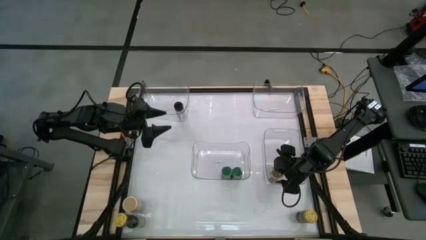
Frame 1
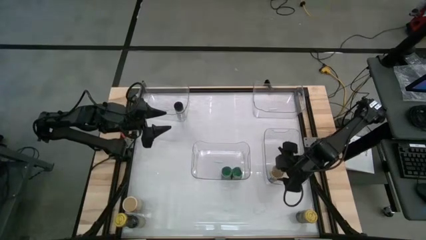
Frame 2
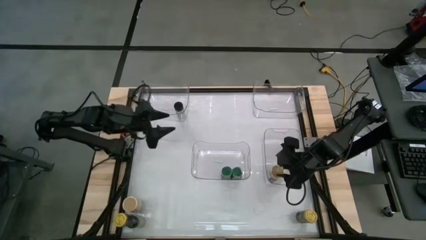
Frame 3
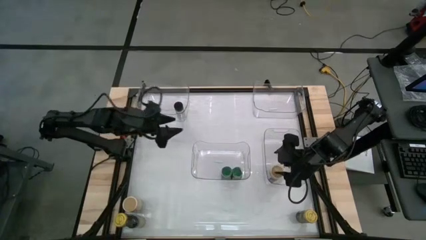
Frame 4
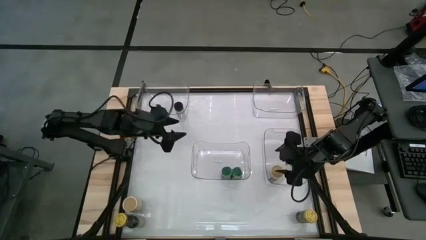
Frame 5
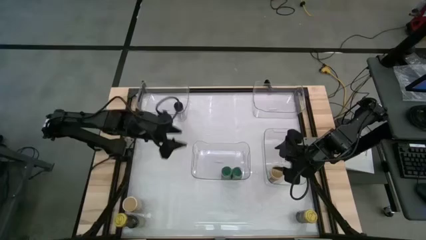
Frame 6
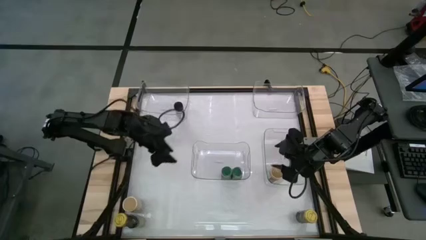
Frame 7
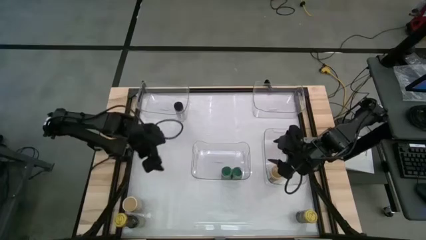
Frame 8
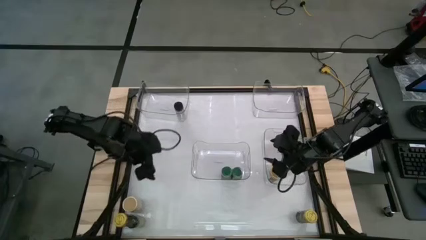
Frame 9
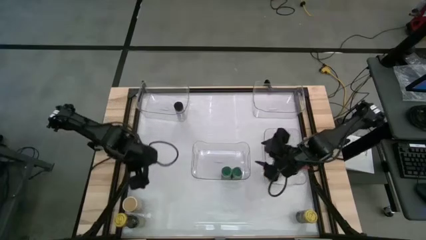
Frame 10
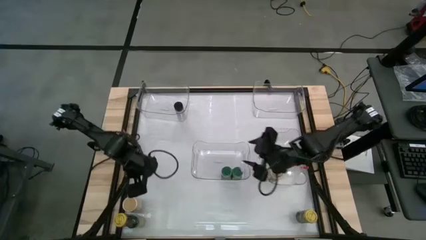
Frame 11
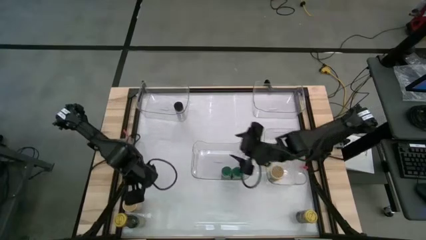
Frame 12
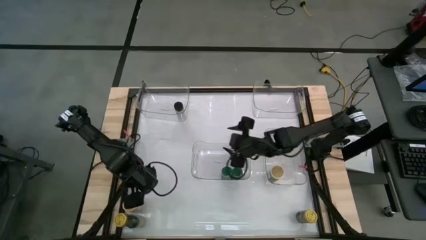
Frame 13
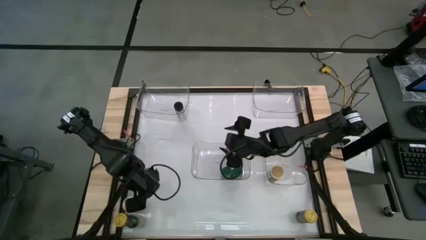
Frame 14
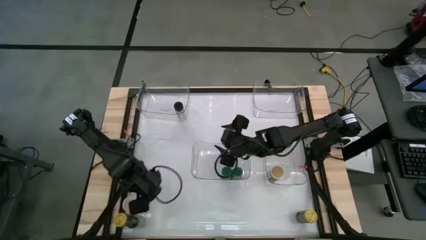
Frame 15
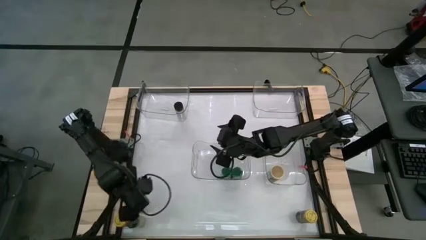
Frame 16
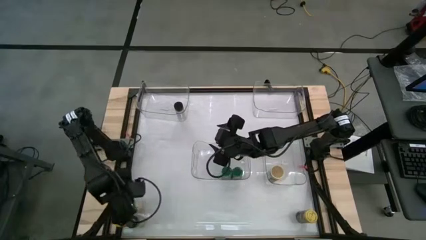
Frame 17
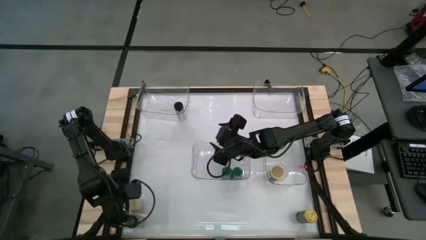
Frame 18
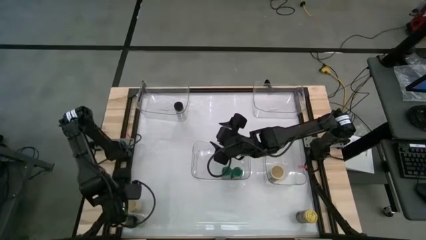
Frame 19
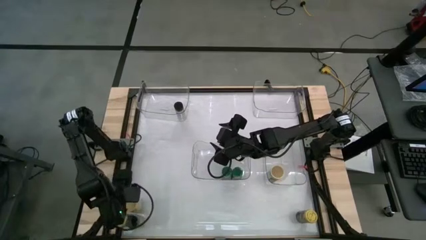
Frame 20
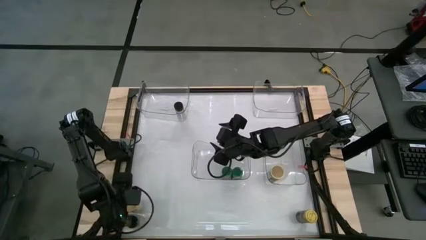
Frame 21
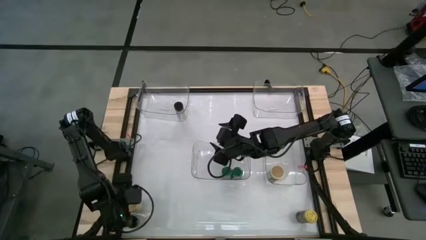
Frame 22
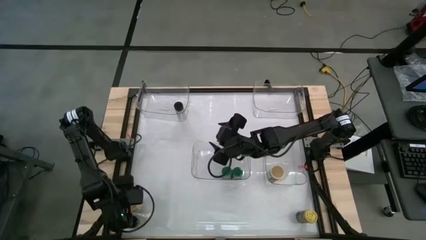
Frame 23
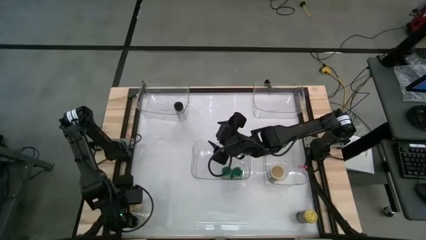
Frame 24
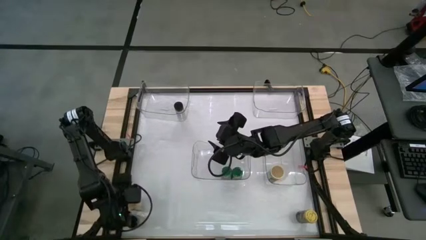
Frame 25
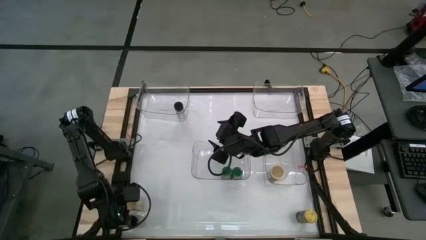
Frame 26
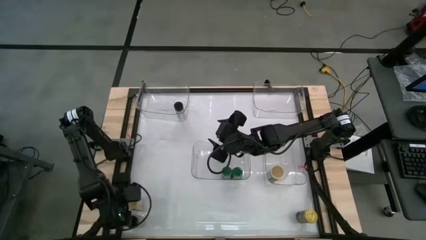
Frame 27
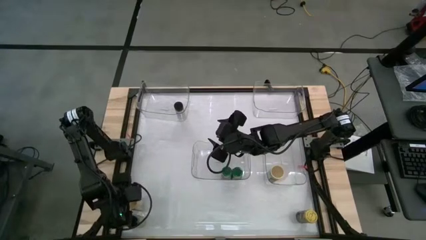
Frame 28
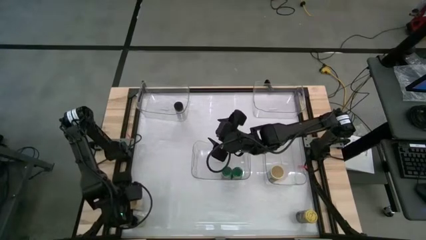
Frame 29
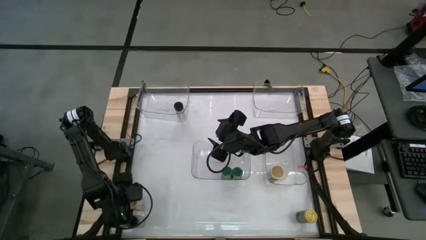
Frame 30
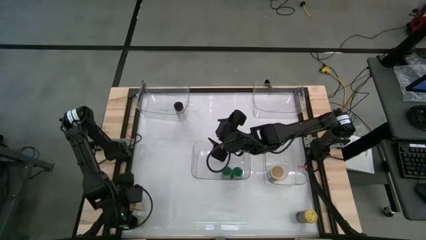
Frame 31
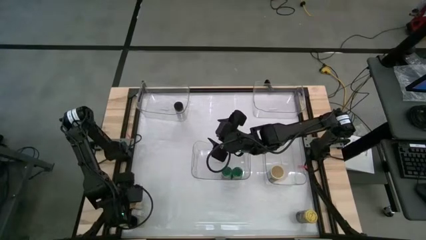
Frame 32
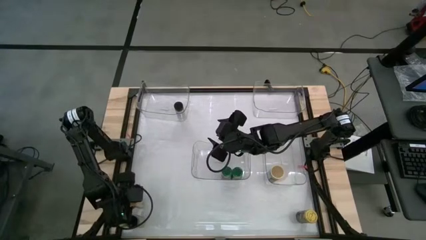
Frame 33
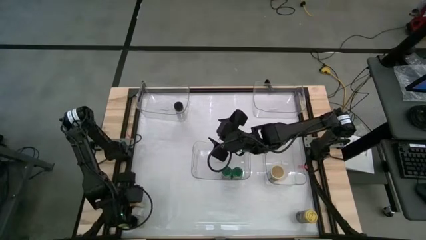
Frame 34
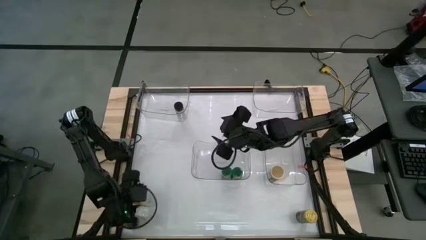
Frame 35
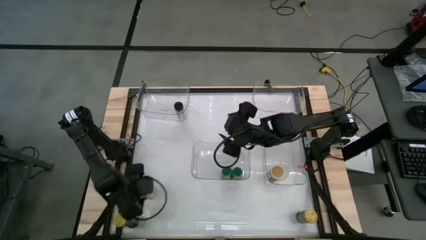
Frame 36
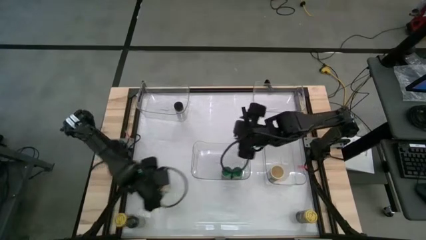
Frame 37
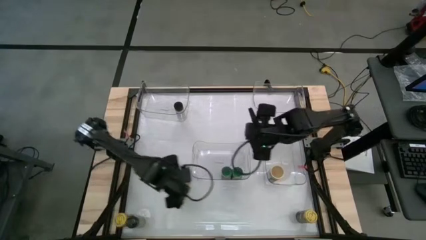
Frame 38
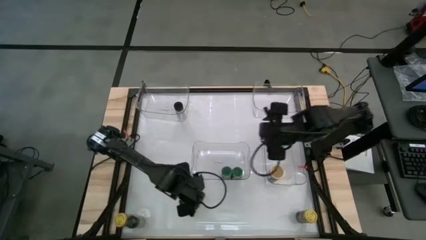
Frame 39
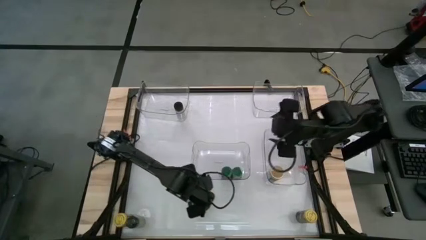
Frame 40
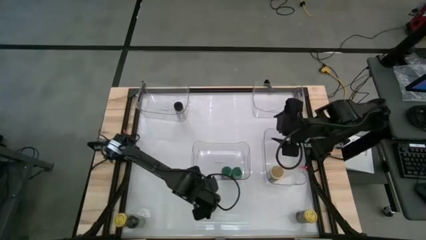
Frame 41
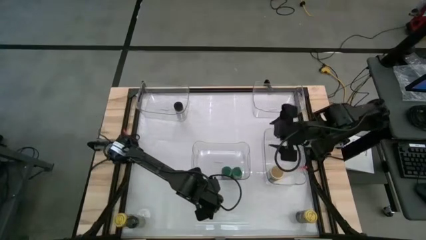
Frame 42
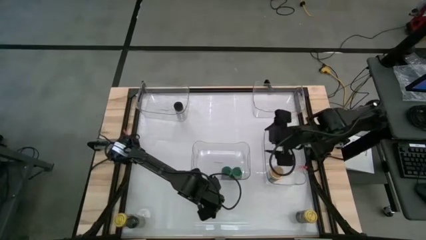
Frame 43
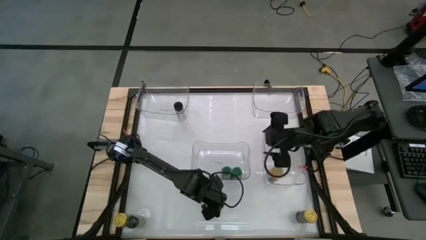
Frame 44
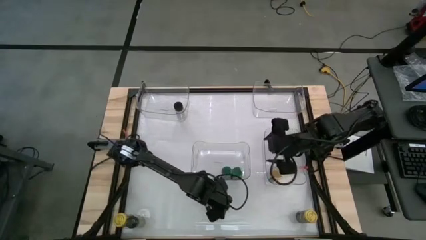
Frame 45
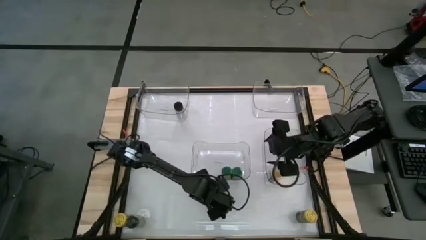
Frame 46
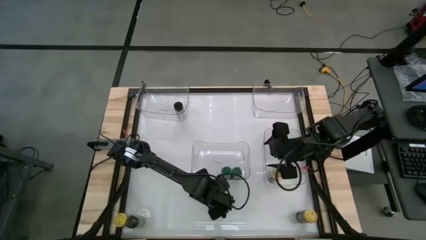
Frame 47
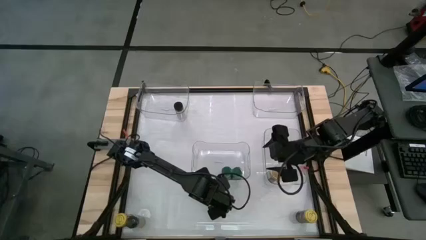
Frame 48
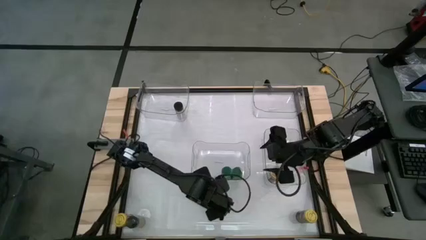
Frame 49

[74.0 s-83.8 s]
Task: Sort spices by type
Put the gold seasoning bottle into the bottom right transparent bin

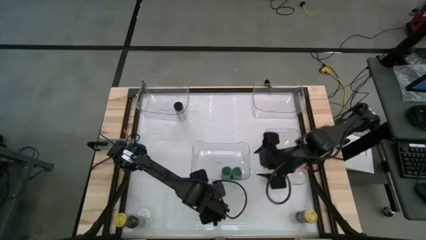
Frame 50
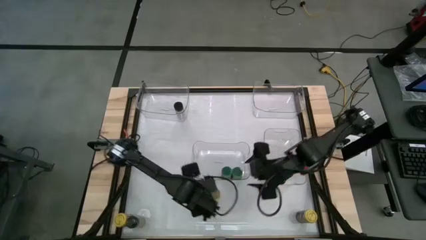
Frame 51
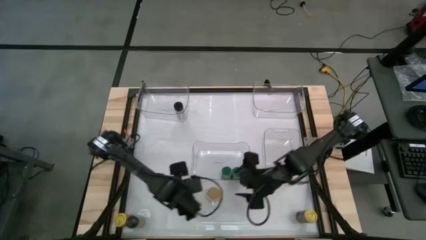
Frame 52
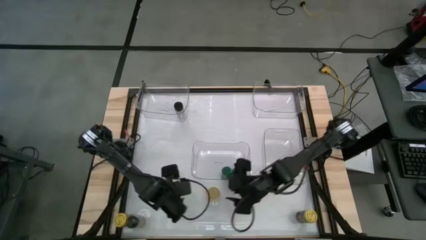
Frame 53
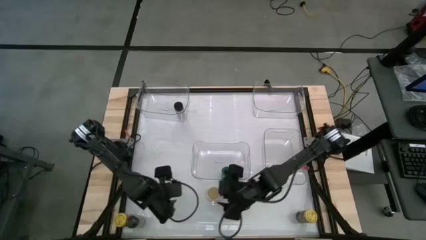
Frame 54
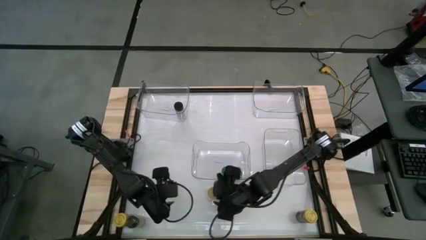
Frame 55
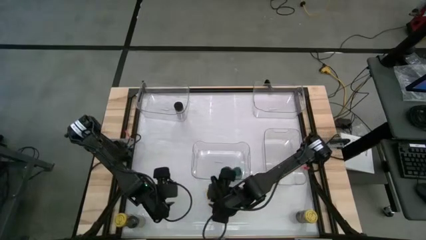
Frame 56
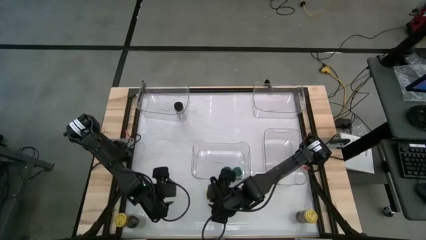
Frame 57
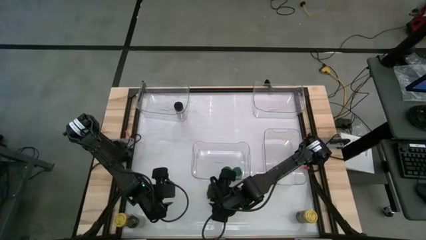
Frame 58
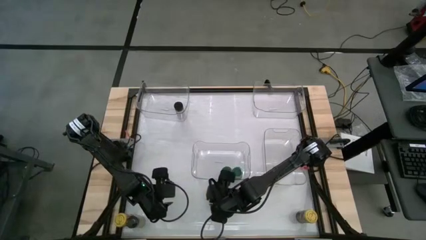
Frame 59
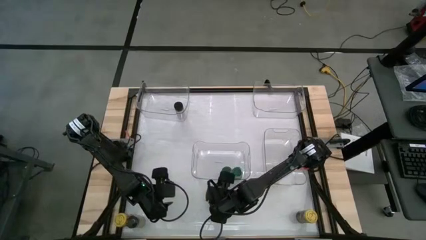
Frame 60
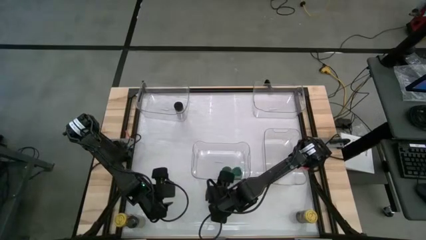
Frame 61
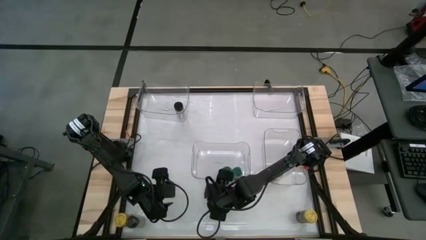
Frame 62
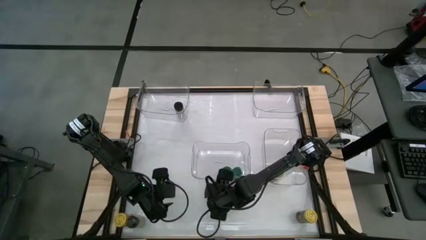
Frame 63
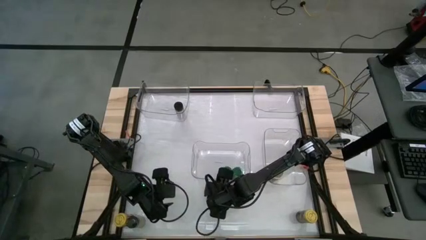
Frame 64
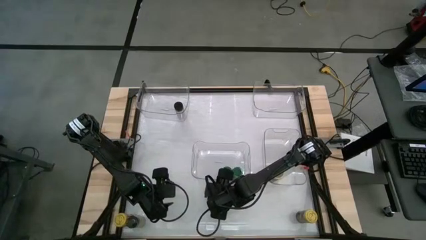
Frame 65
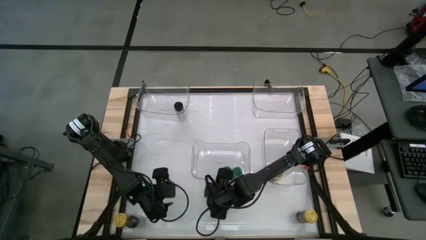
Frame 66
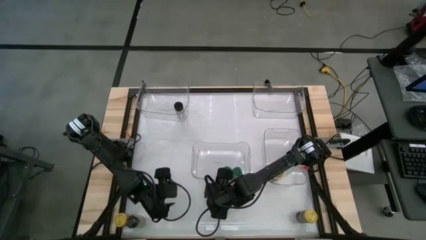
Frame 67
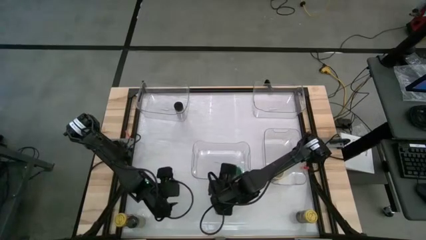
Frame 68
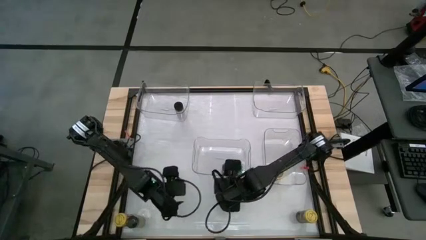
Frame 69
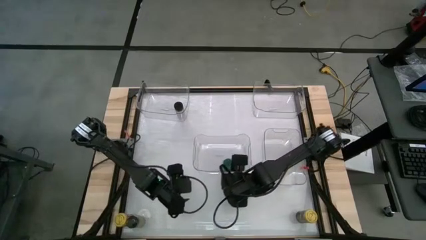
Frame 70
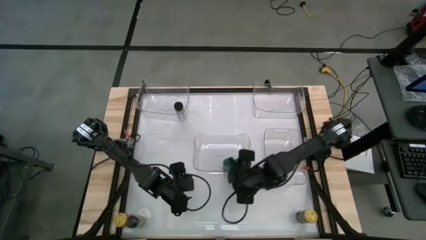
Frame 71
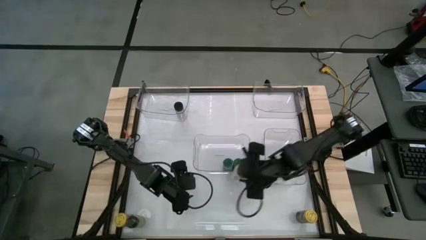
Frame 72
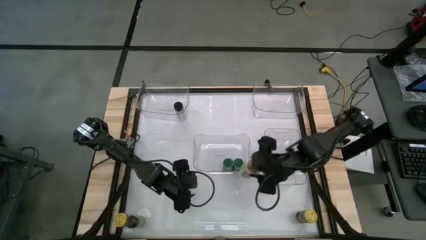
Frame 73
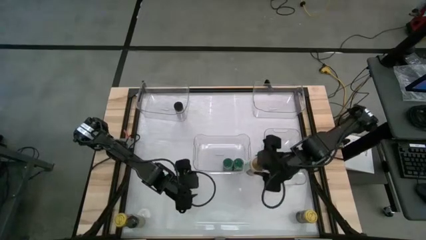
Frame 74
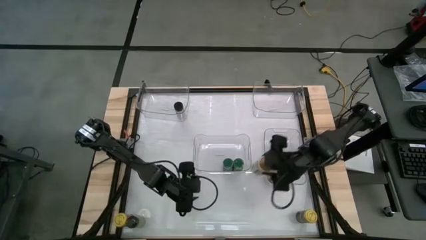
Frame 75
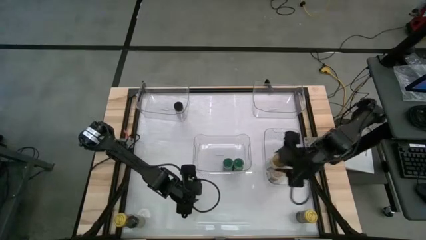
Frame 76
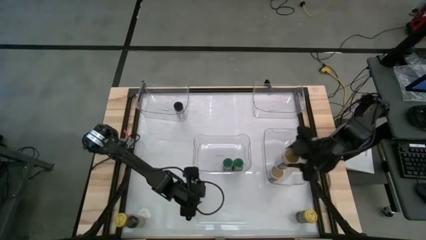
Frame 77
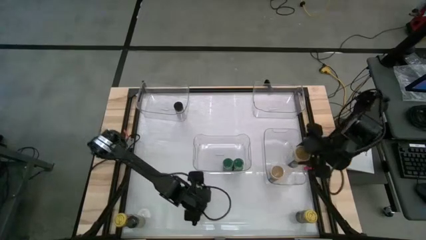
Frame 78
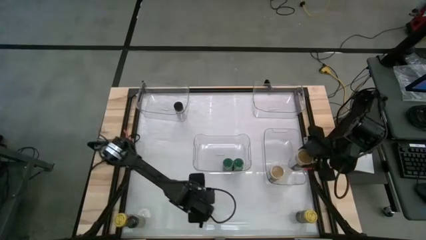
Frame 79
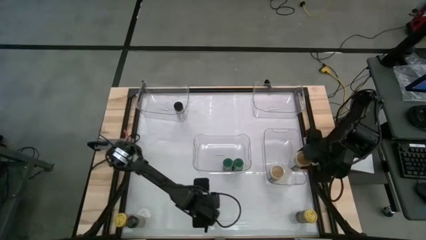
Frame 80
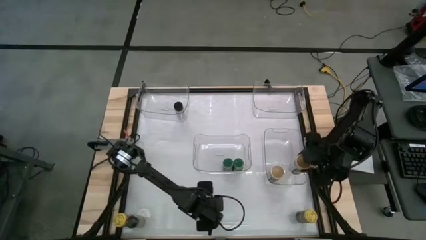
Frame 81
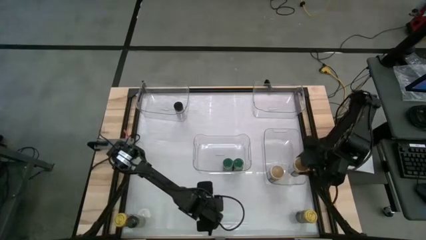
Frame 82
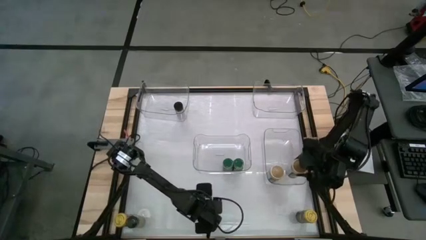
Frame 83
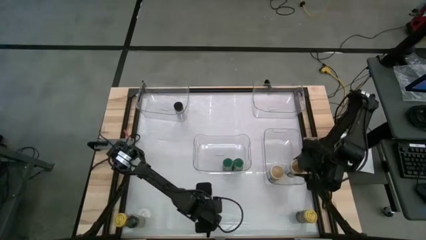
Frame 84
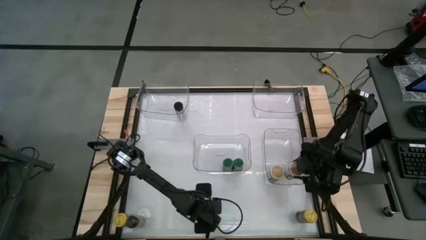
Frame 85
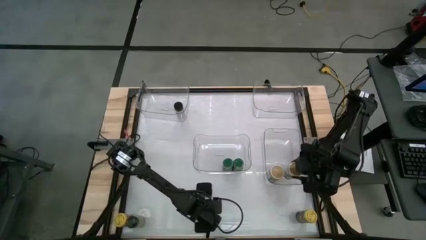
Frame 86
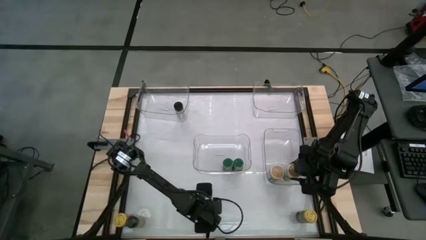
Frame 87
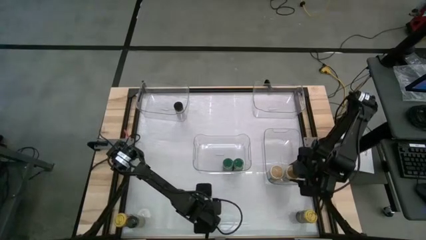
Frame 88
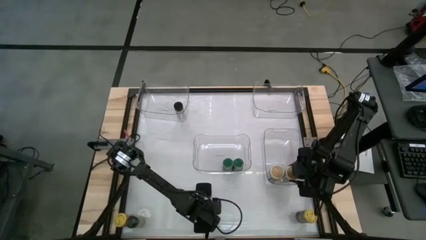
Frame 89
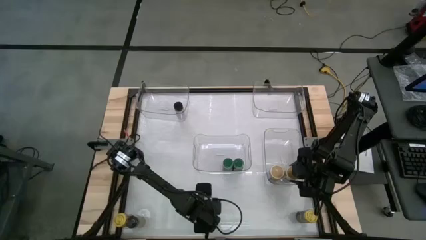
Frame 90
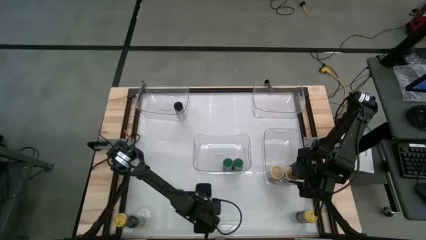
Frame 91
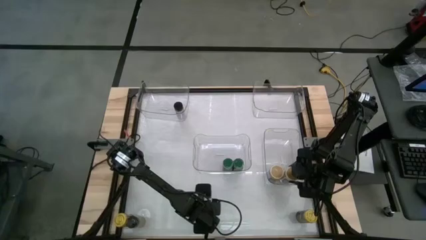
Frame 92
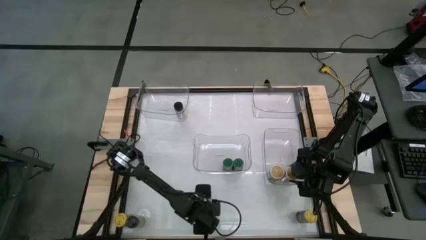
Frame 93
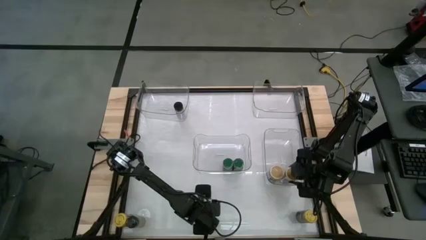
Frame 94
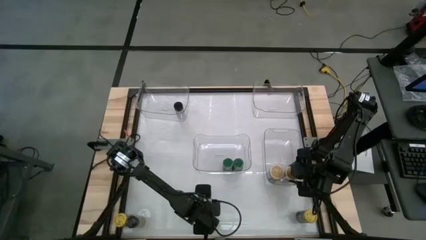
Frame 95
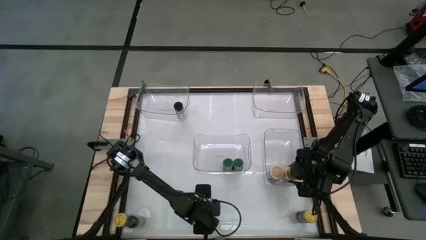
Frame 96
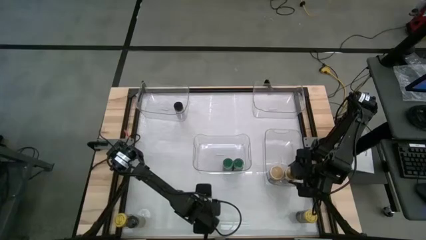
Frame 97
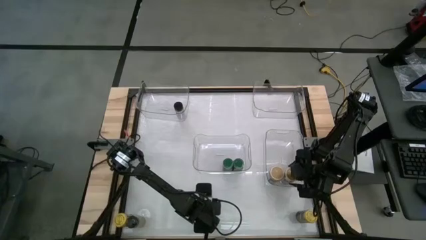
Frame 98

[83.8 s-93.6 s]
Put the gold seasoning bottle into the bottom right transparent bin
